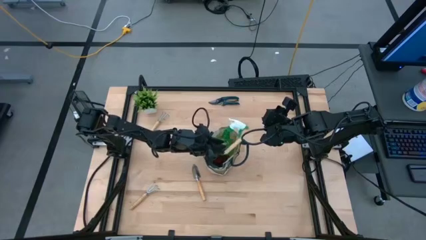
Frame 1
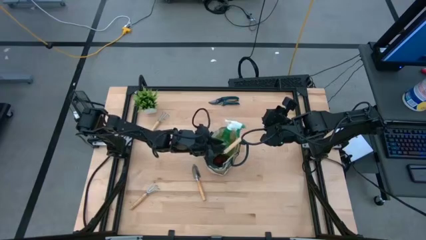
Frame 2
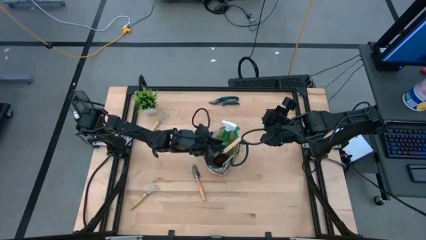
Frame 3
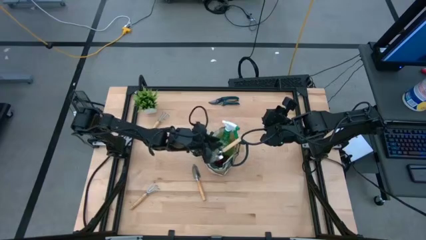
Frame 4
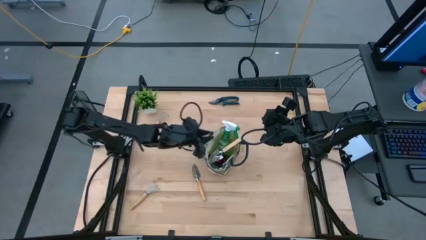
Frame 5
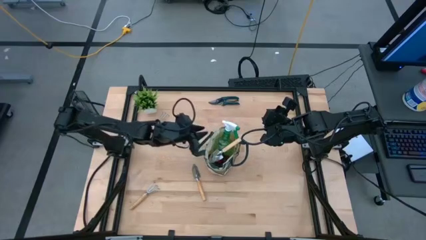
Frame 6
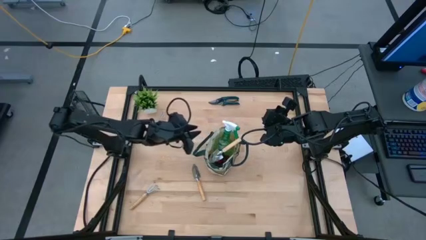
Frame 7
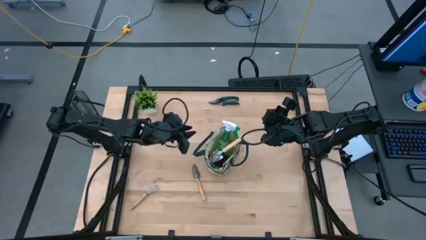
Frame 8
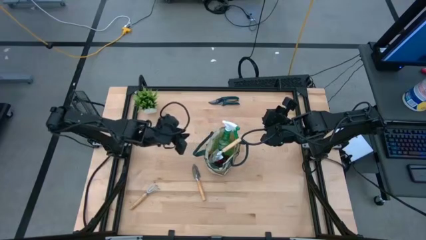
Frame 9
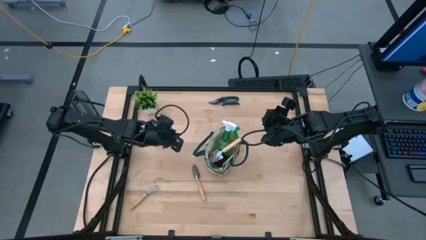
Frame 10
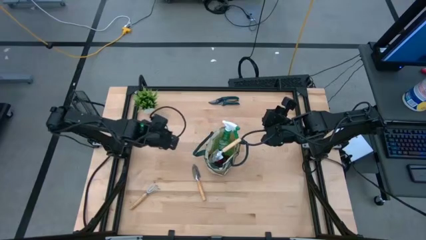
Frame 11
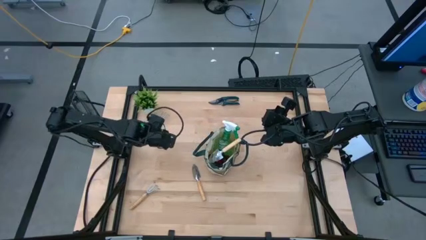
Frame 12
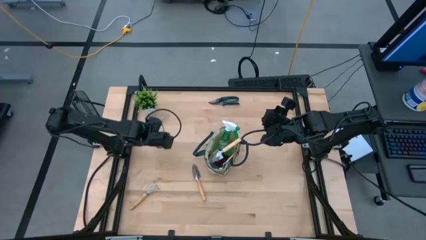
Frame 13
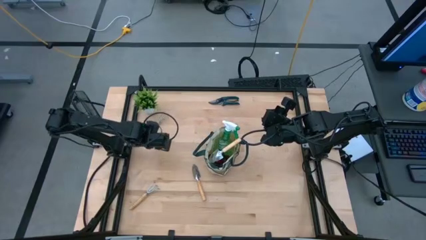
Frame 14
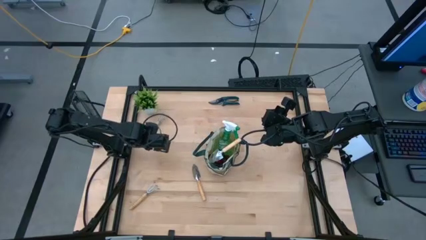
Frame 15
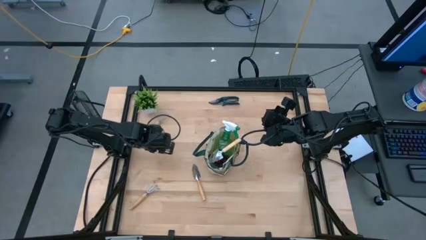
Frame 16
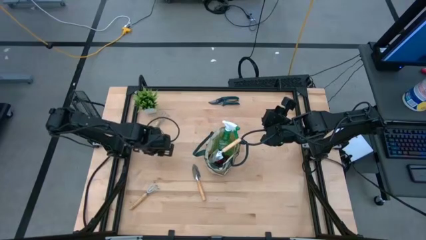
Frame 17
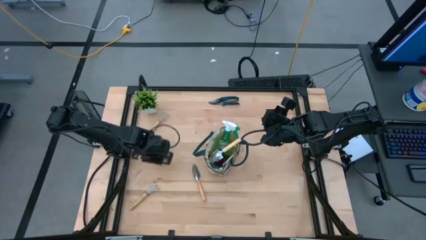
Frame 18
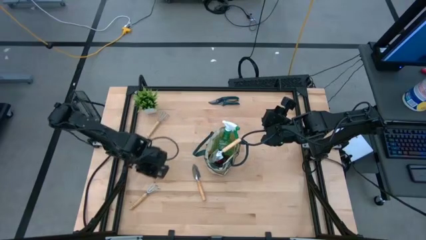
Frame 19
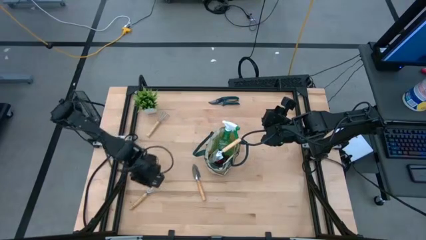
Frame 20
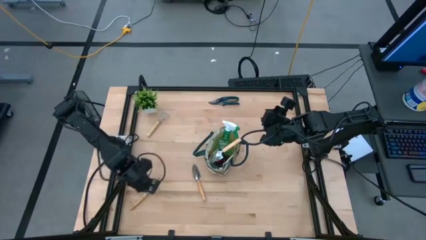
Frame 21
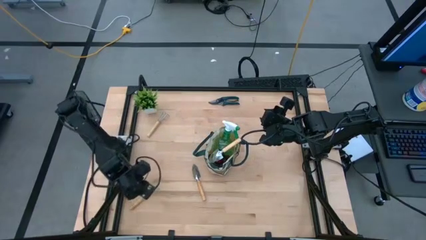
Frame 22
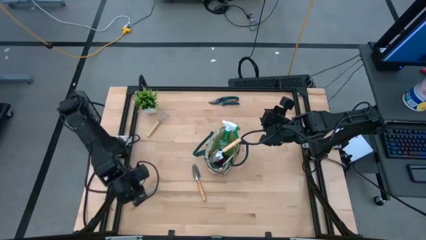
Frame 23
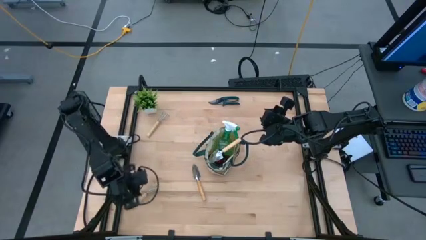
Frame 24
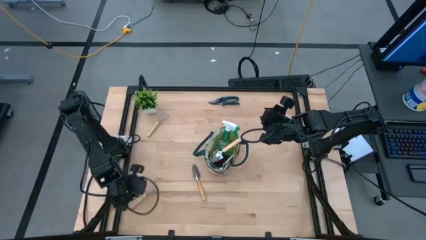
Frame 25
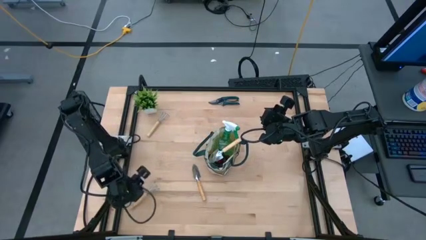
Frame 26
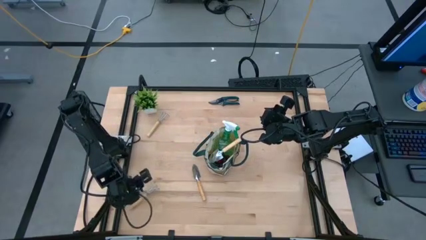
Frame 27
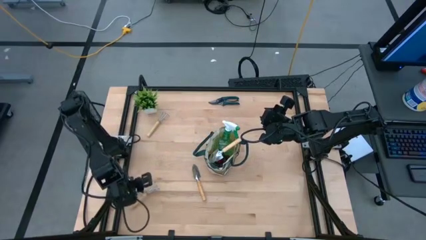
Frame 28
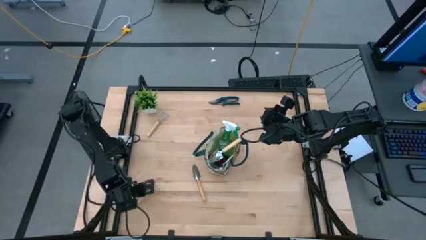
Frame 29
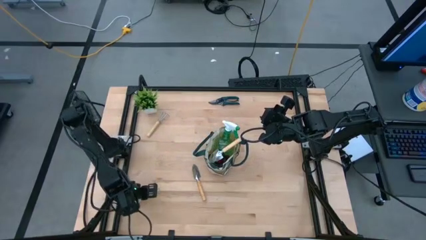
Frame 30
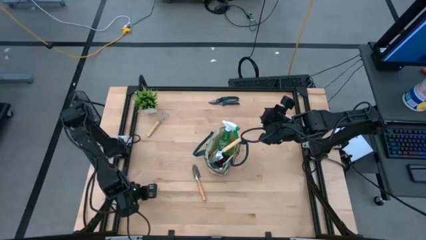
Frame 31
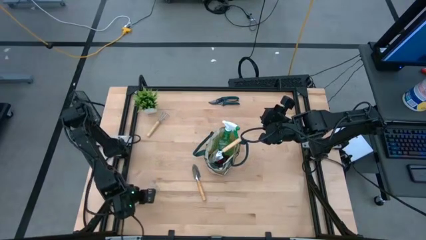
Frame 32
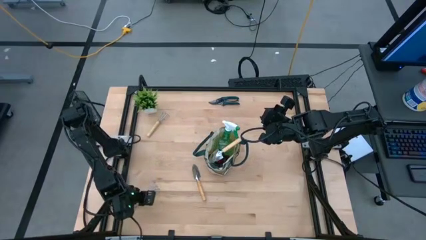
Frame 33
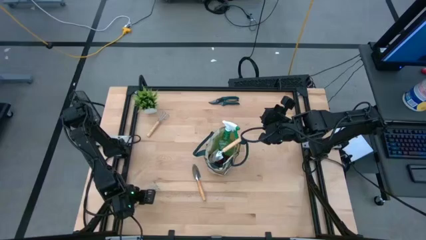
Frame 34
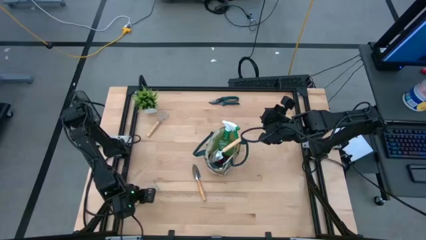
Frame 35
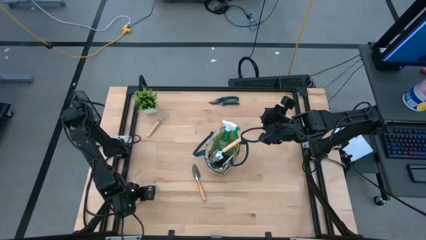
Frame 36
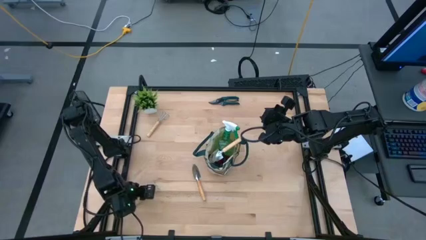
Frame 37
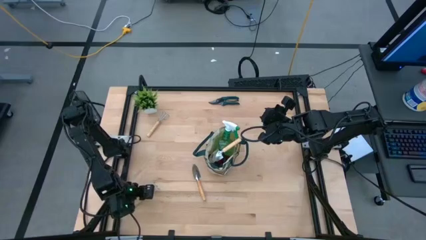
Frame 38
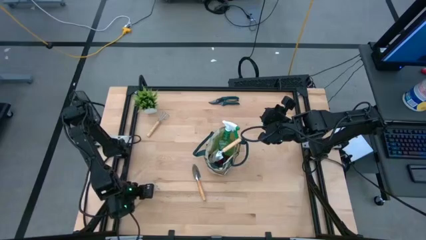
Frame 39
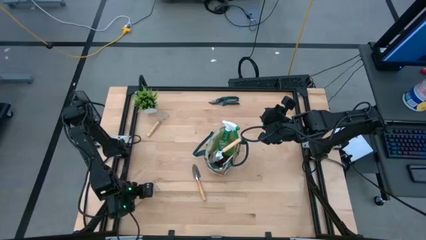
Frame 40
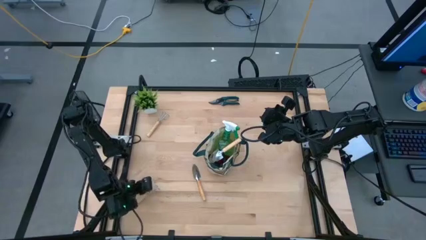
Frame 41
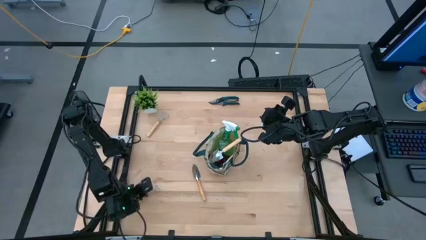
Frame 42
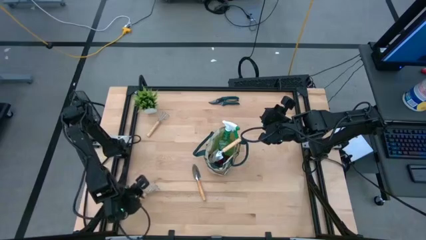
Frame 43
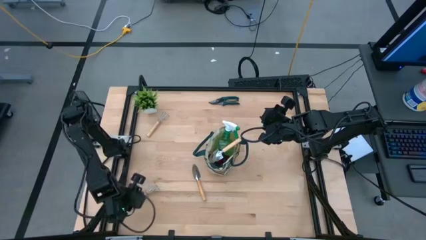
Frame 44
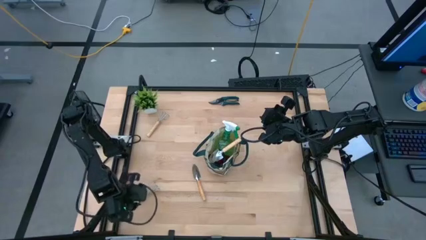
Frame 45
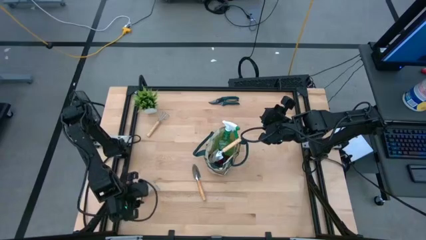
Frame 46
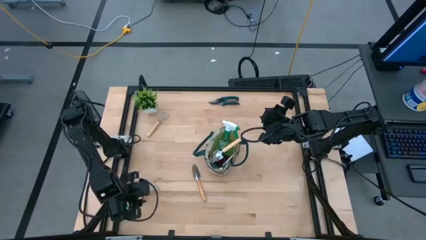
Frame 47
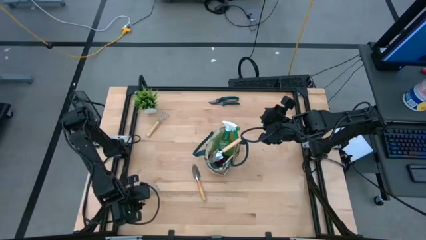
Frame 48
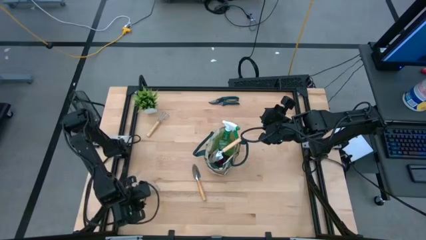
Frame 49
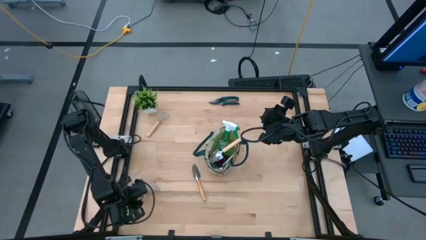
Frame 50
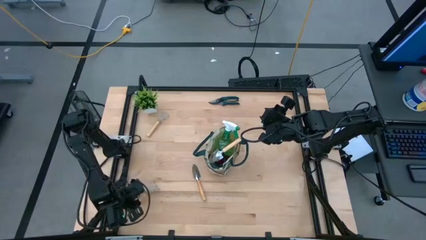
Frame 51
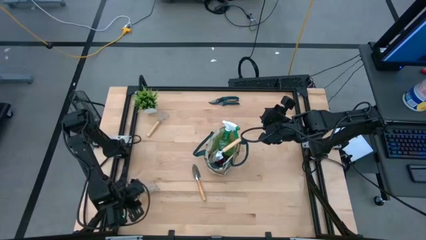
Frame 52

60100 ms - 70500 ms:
Task: Pick & Place Garden tools in Gardening bag
Put the bottom brown hand rake into the gardening bag

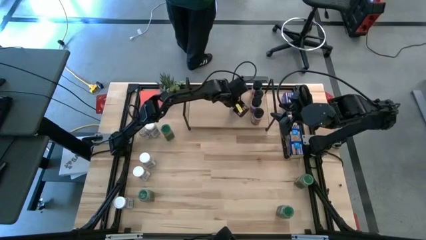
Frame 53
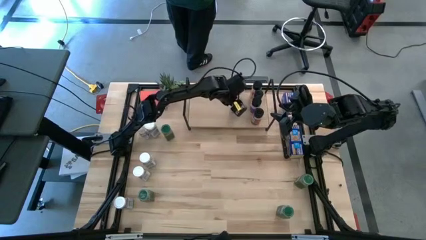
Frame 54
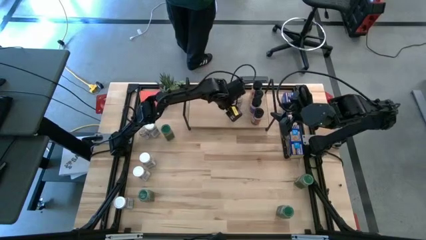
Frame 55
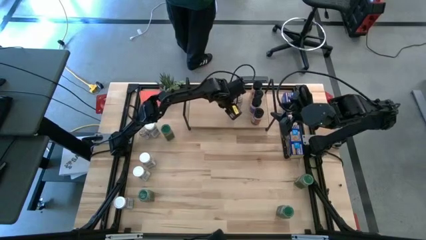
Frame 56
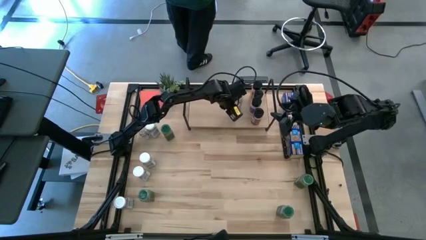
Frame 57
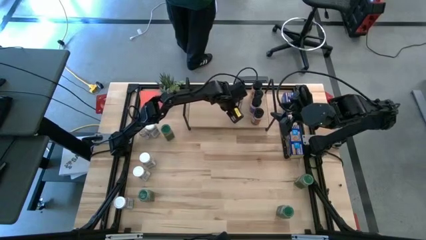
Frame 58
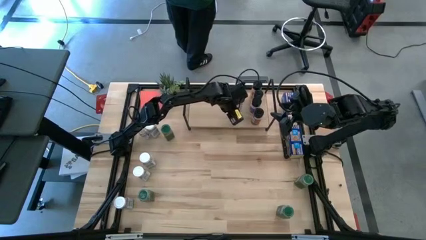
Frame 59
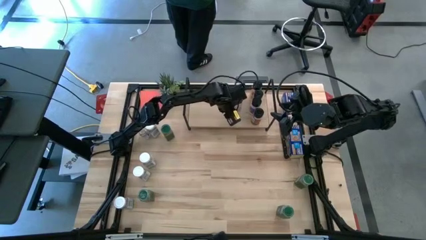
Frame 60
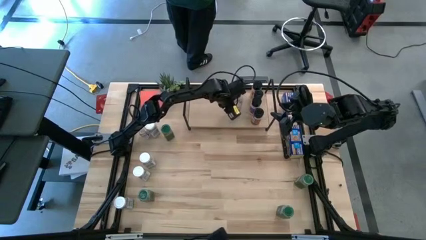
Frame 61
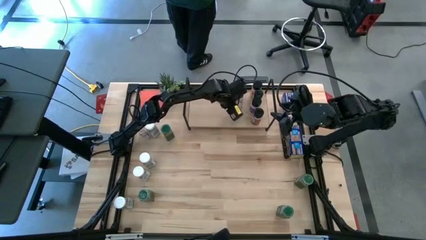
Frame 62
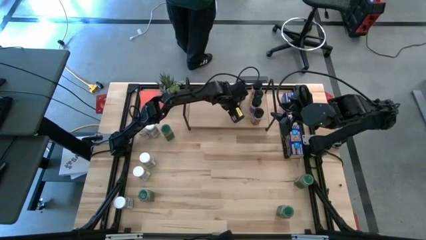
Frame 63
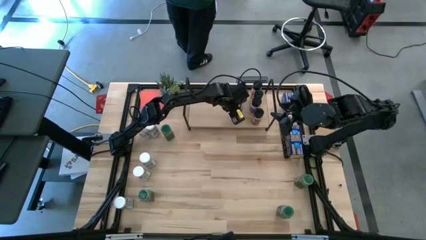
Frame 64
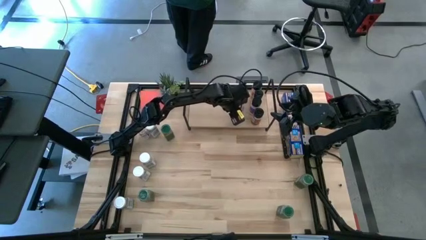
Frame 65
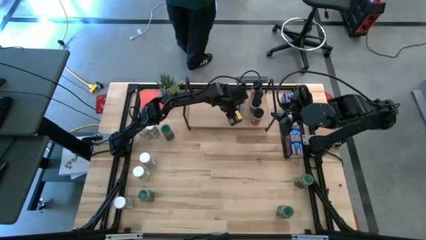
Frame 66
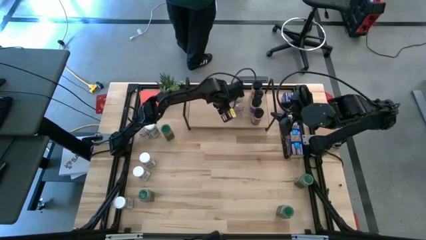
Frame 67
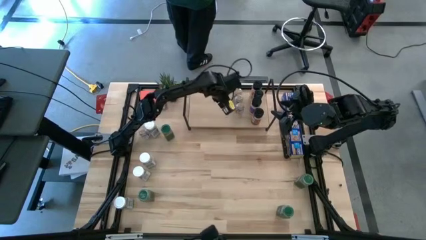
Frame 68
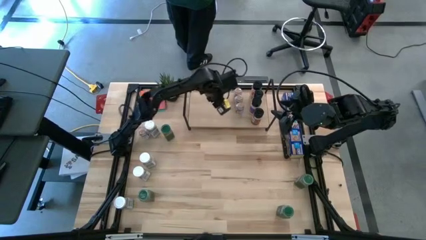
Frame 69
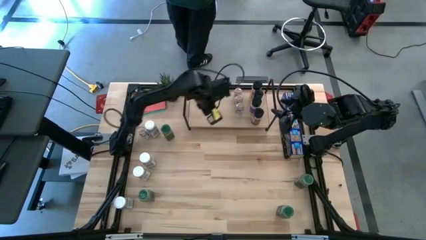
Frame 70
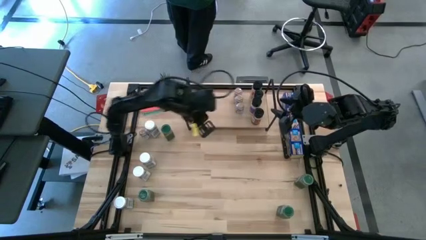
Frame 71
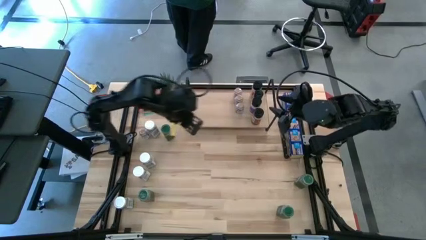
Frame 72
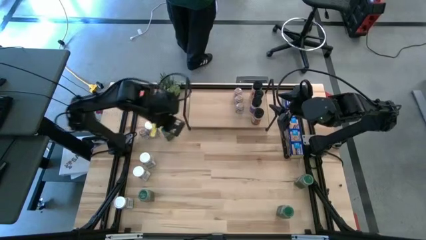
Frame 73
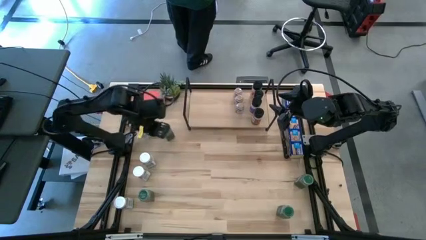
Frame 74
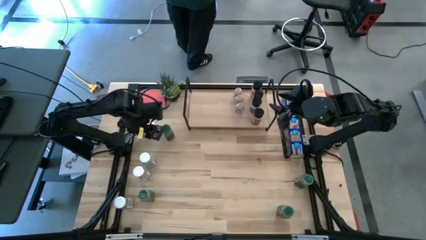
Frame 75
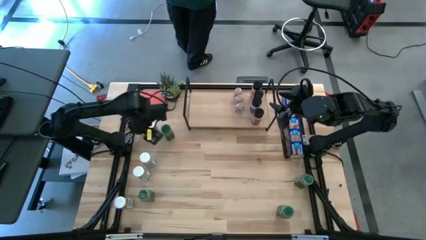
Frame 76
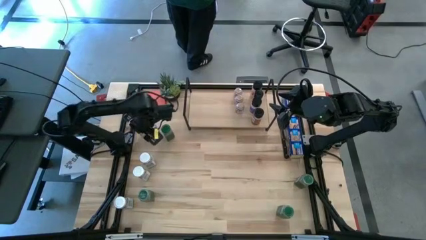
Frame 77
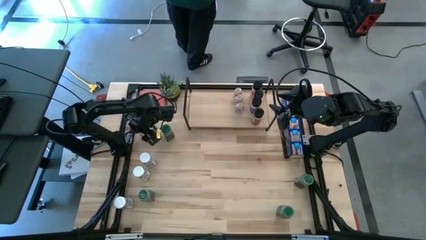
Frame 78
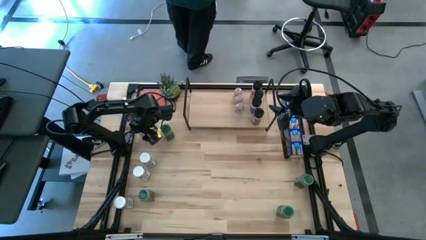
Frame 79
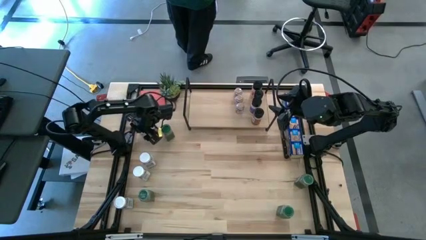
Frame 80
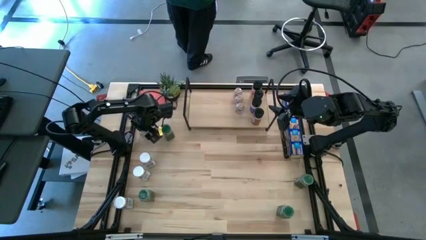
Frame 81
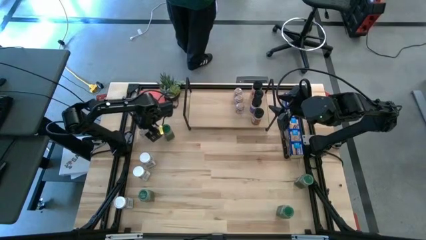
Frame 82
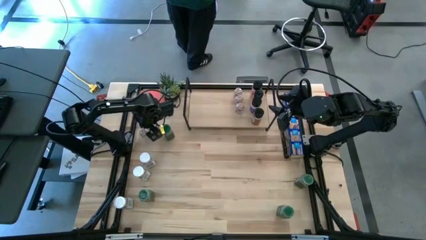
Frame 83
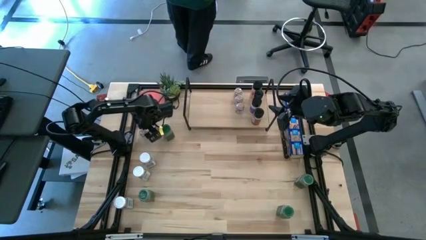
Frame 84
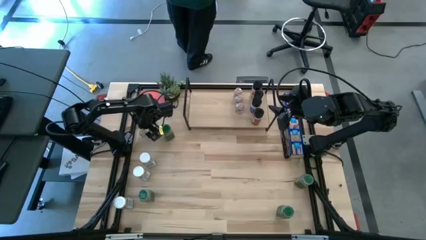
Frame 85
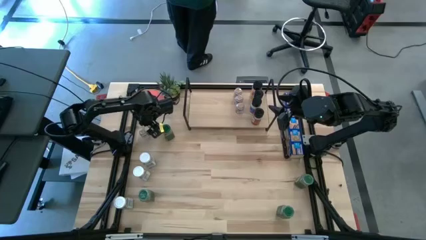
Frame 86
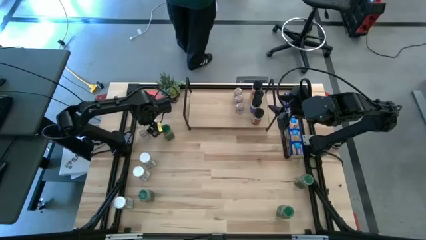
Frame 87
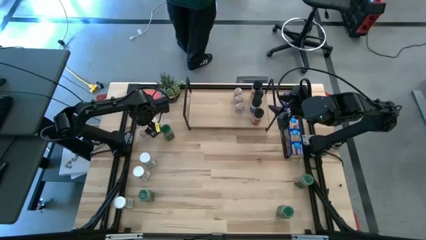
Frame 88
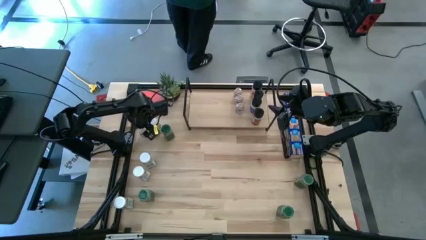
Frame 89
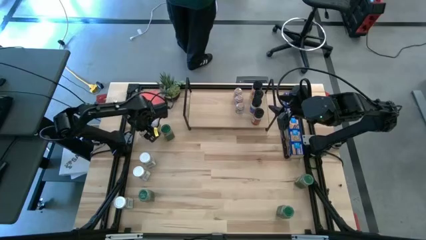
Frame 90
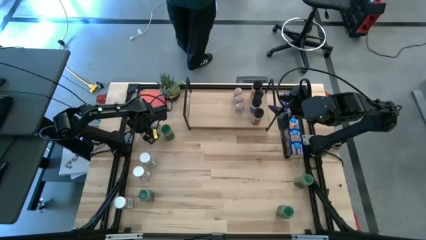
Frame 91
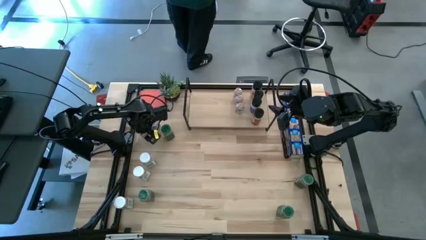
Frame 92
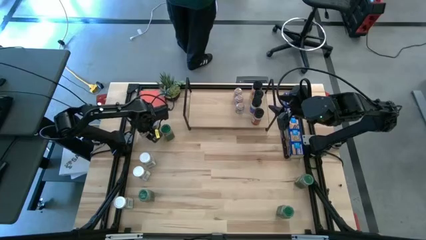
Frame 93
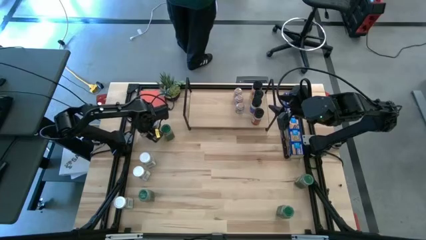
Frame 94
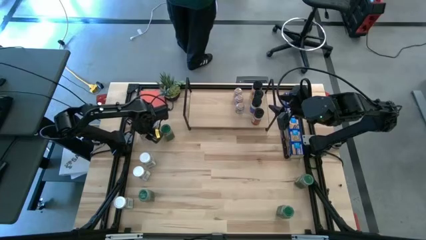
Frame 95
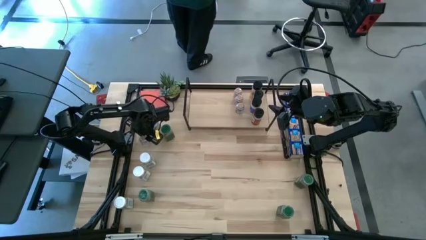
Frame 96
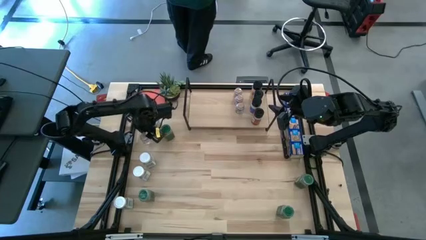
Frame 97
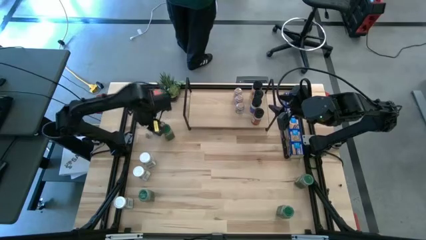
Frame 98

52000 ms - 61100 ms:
Task: Shelf spices
Put the brown seasoning bottle on the shelf, aligned with the other brown seasoning bottle
